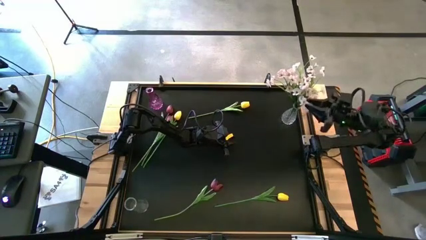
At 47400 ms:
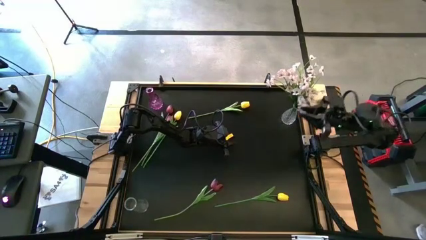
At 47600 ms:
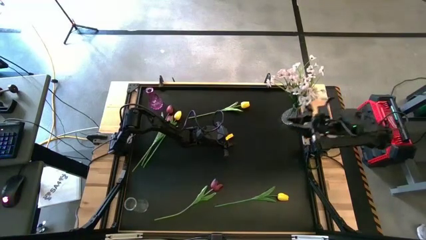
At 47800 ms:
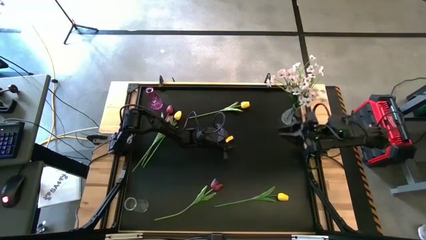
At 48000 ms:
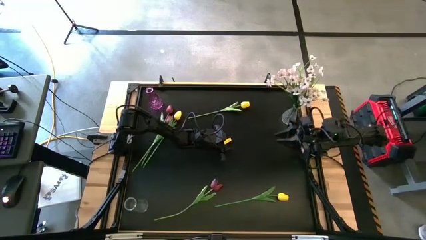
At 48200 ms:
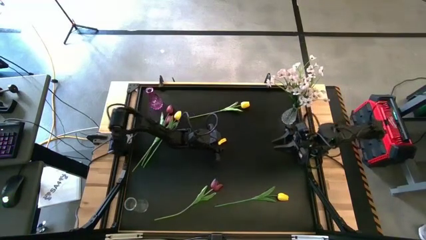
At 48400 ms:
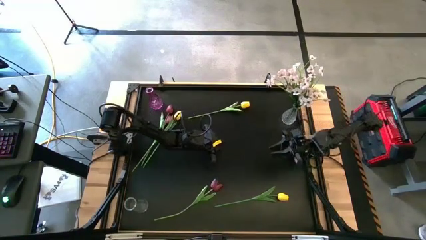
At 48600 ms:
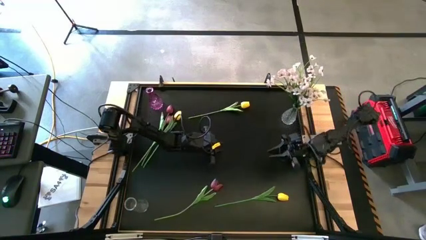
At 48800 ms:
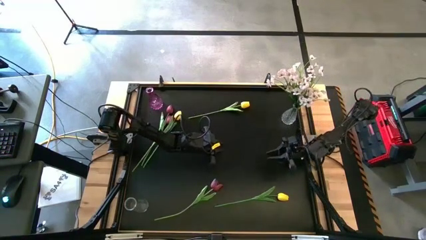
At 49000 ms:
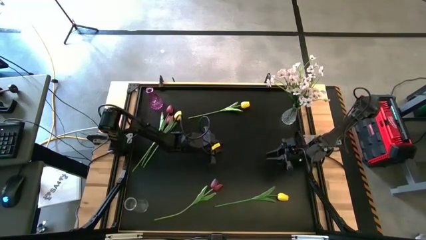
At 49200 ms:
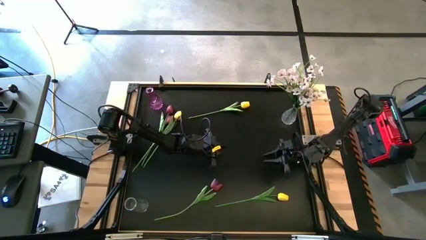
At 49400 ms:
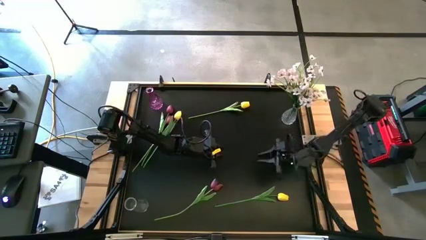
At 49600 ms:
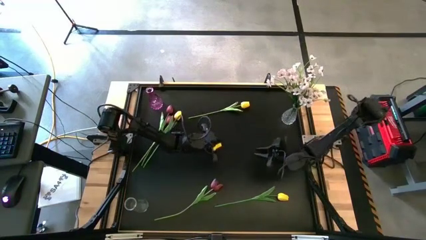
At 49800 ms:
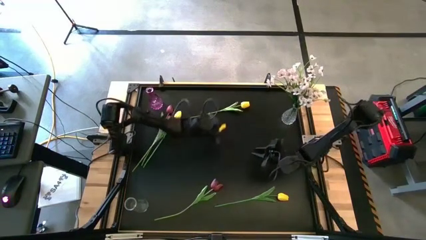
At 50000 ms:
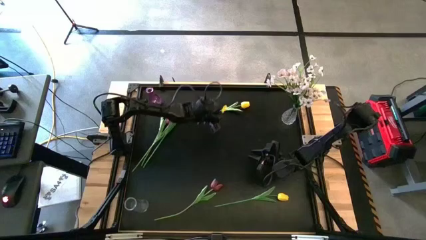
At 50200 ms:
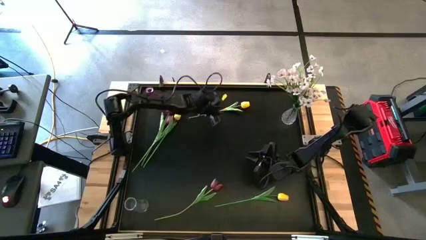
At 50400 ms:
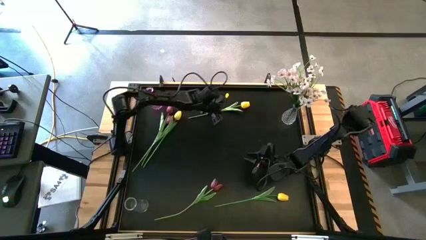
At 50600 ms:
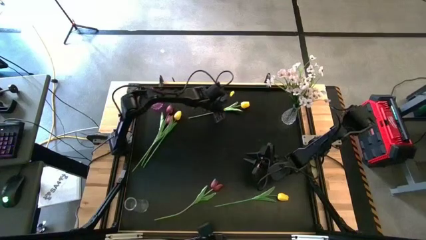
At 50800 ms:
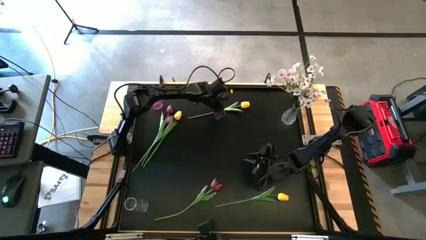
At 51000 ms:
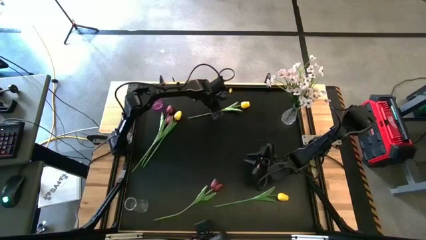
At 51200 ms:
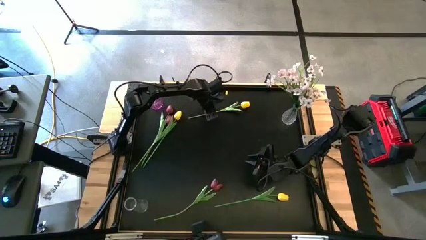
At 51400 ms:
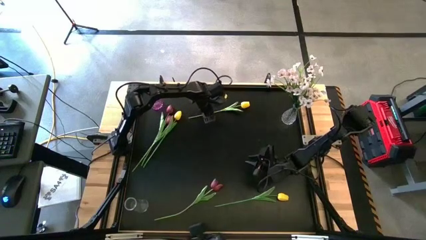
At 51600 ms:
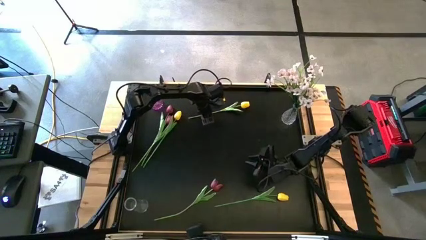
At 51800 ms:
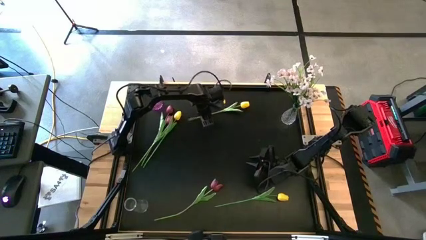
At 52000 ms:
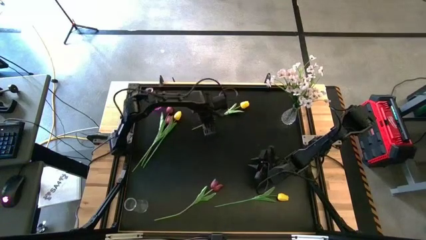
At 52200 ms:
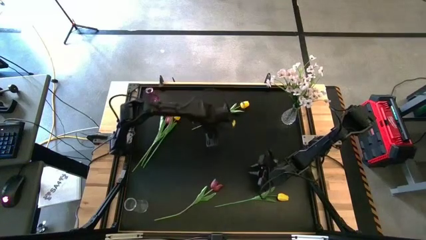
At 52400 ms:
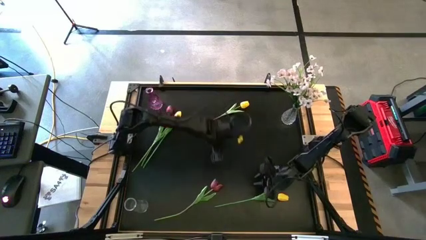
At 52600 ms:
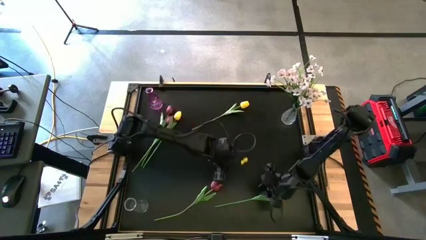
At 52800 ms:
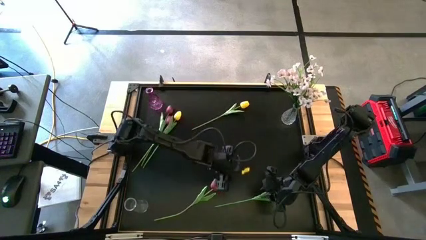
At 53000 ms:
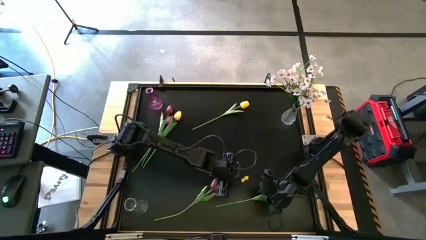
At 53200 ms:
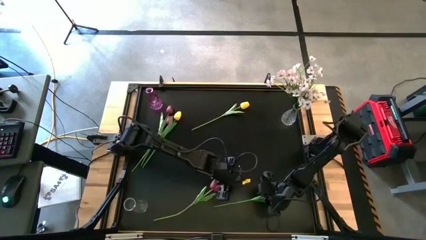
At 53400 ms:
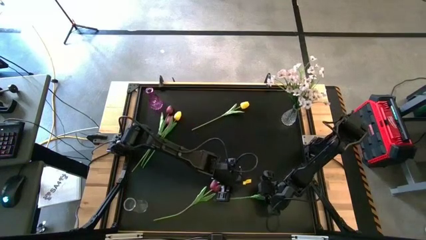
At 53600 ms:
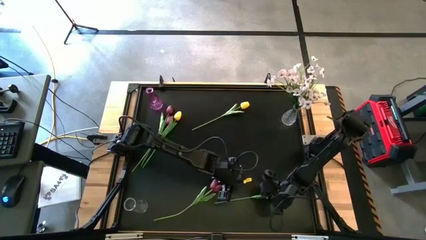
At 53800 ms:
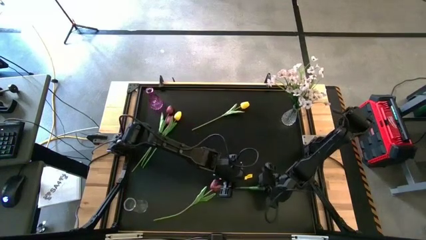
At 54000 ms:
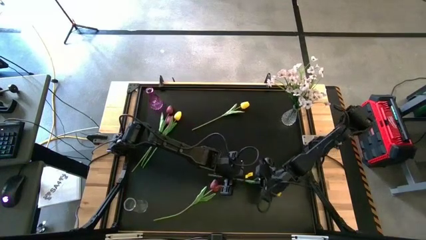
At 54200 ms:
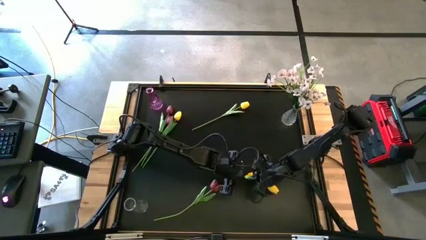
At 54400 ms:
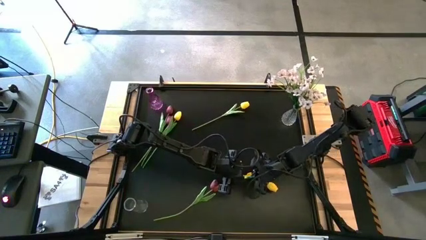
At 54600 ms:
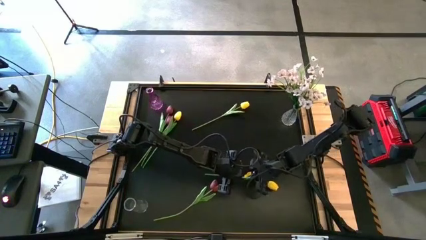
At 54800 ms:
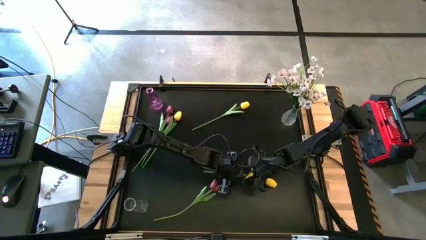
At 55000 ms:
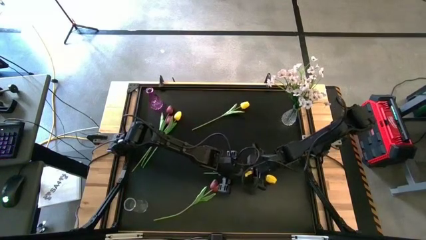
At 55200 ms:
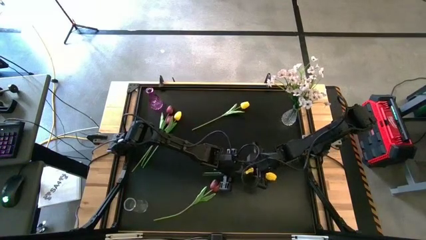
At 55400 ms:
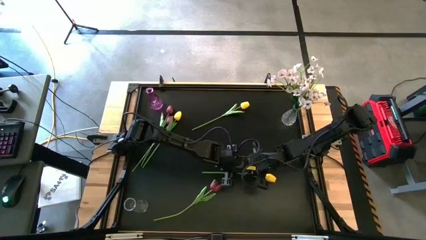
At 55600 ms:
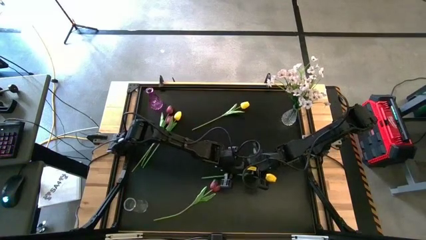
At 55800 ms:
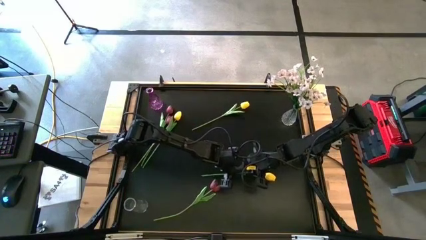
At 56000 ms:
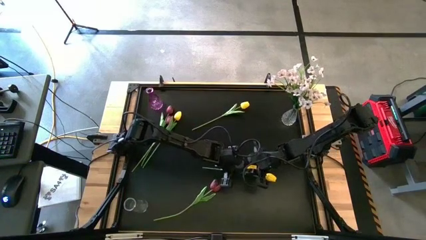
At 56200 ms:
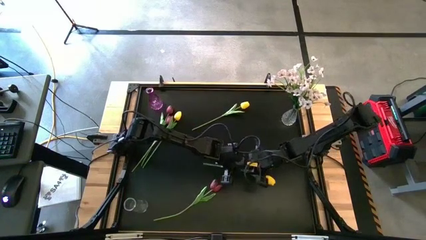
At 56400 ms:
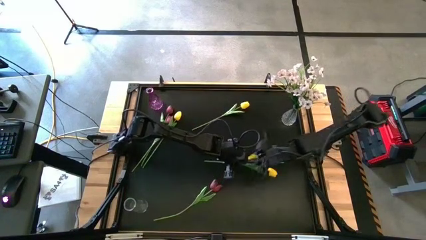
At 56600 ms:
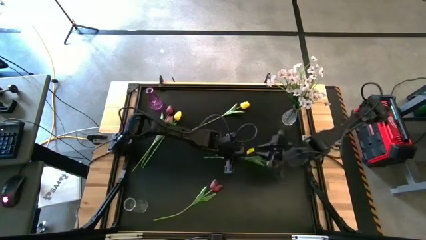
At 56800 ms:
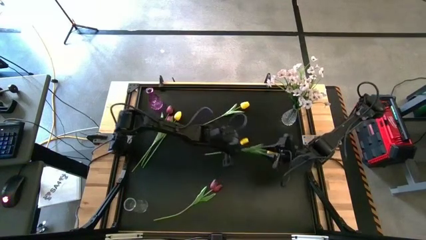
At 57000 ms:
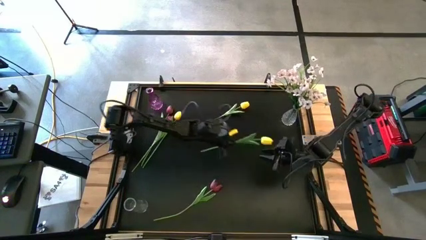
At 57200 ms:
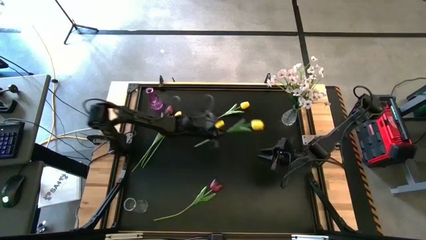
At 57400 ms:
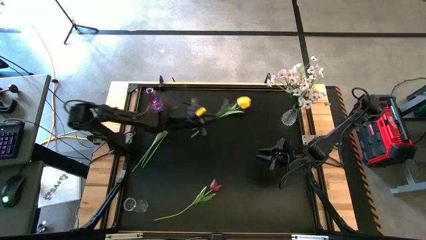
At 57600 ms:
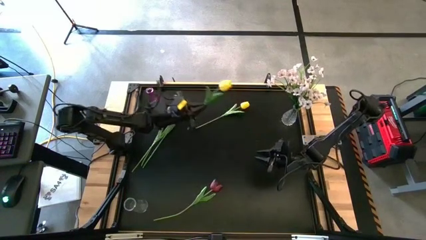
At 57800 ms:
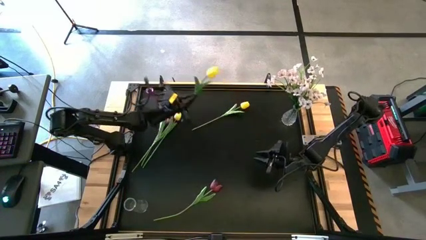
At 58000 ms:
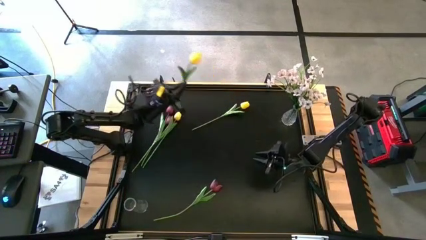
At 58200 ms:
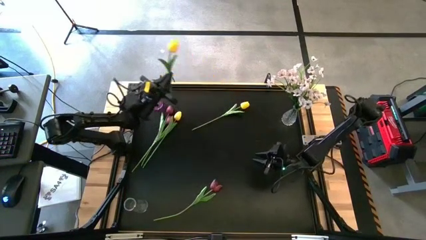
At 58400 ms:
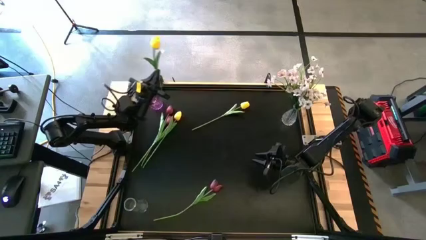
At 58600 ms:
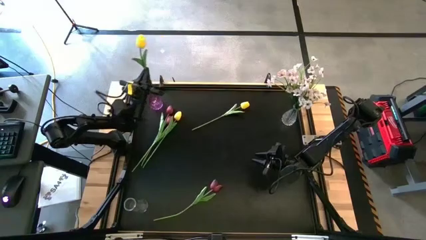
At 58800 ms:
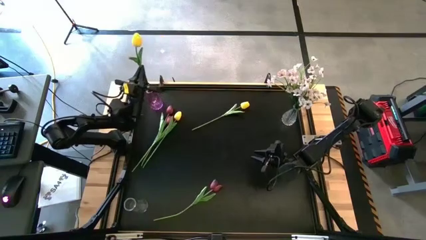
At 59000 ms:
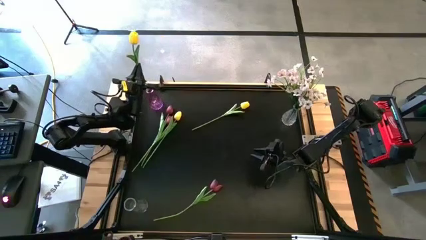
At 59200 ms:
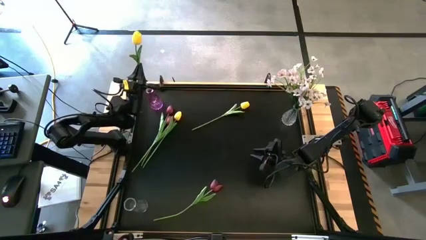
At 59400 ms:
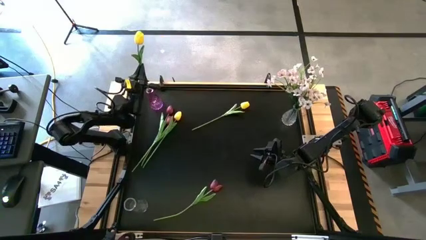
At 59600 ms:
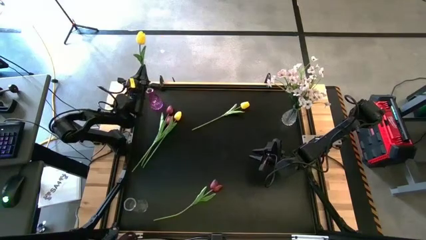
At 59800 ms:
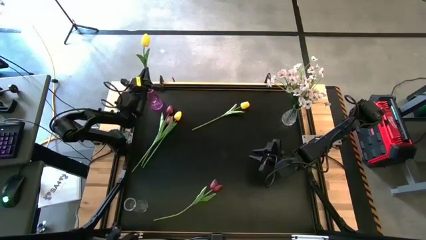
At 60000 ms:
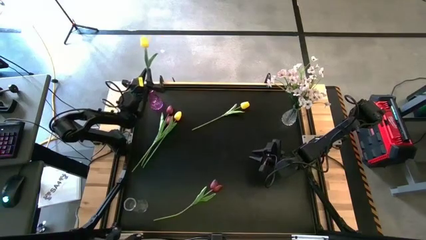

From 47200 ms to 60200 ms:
Task: Sort flowers into vase by color
Put the bottom yellow flower into the purple vase
